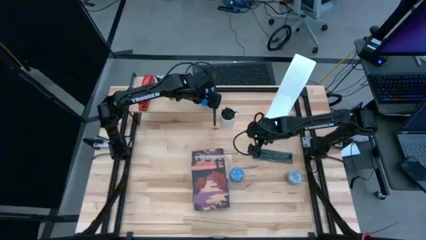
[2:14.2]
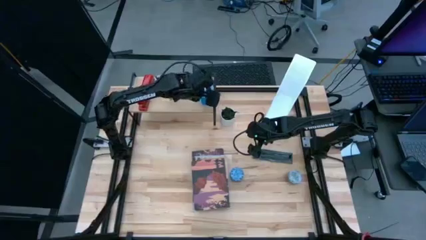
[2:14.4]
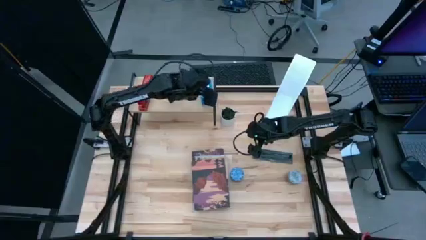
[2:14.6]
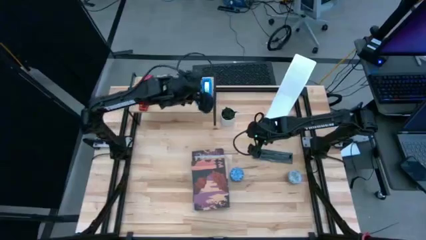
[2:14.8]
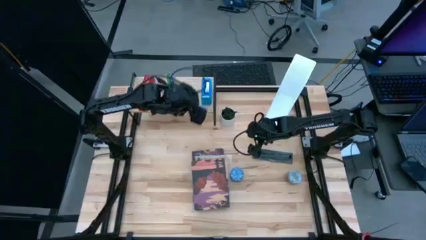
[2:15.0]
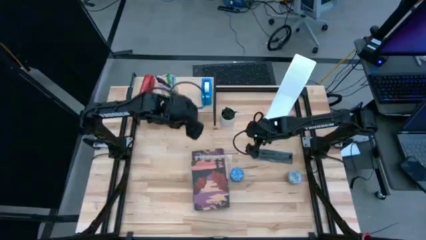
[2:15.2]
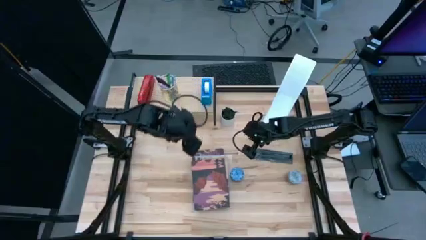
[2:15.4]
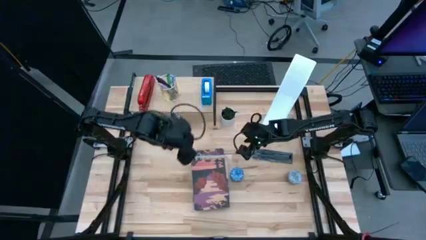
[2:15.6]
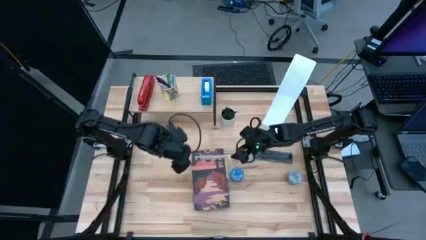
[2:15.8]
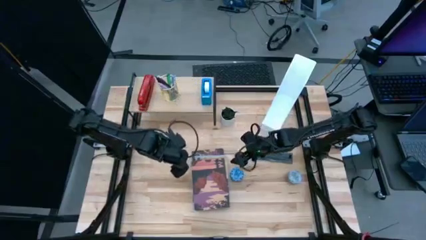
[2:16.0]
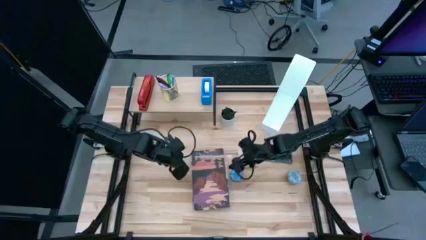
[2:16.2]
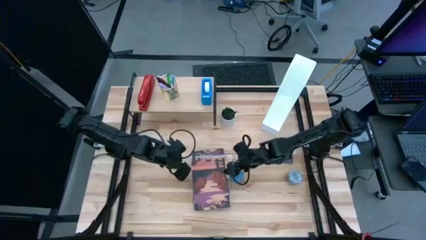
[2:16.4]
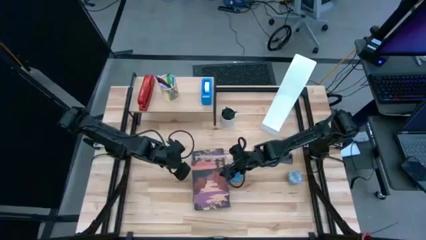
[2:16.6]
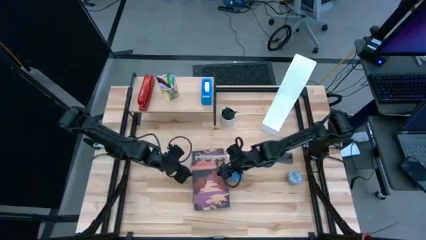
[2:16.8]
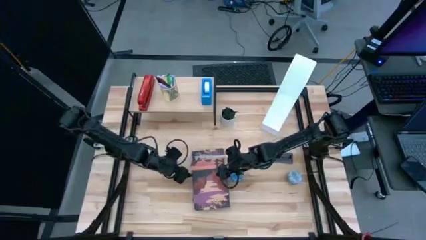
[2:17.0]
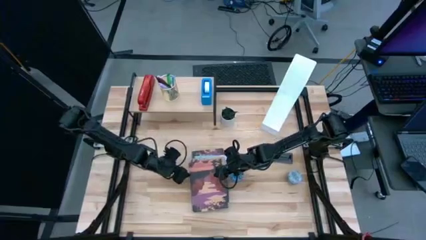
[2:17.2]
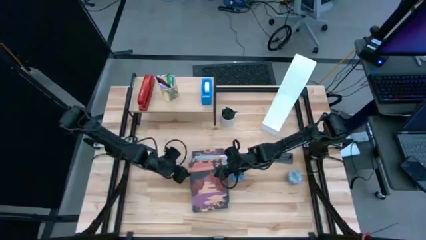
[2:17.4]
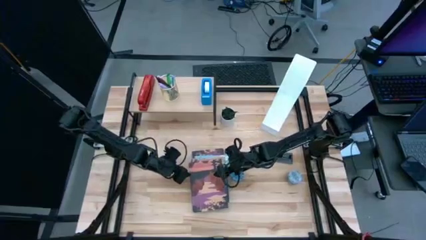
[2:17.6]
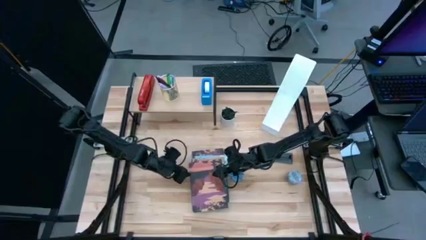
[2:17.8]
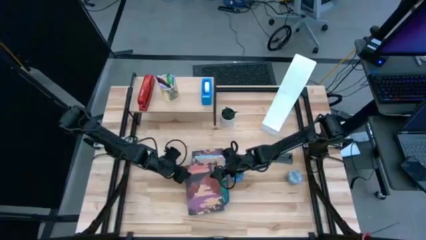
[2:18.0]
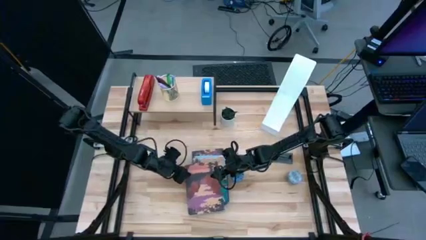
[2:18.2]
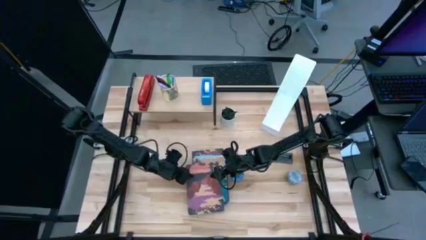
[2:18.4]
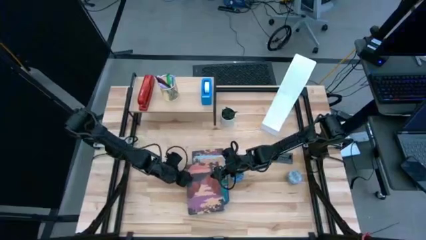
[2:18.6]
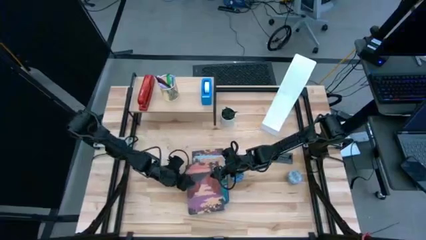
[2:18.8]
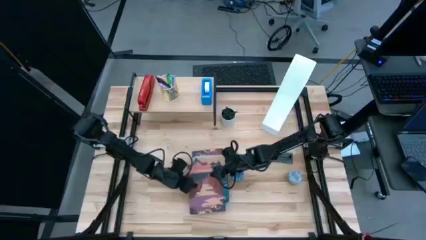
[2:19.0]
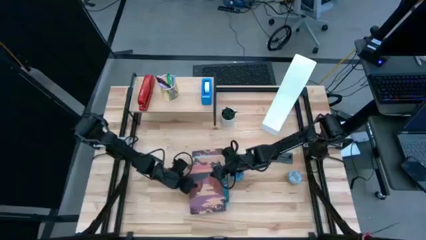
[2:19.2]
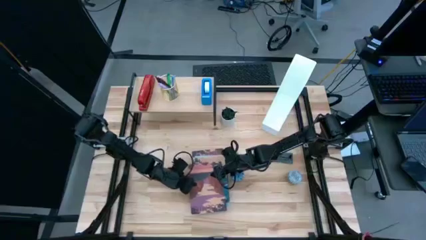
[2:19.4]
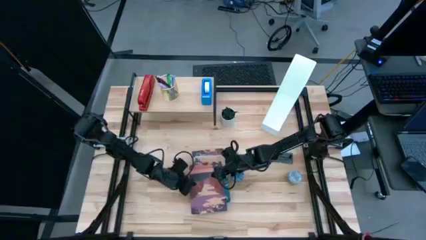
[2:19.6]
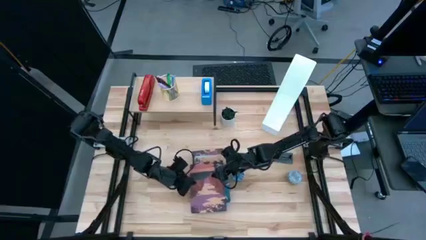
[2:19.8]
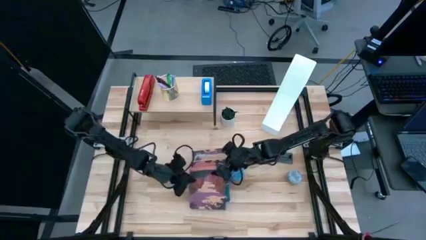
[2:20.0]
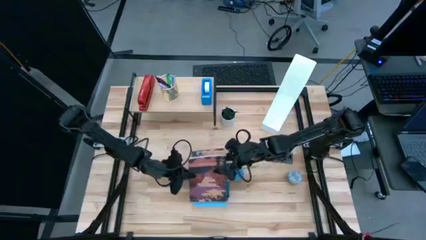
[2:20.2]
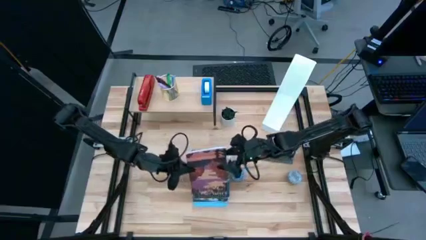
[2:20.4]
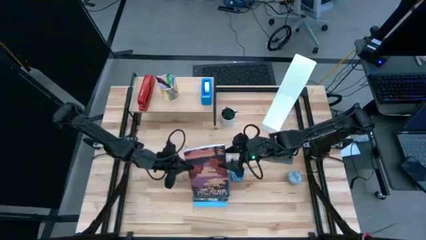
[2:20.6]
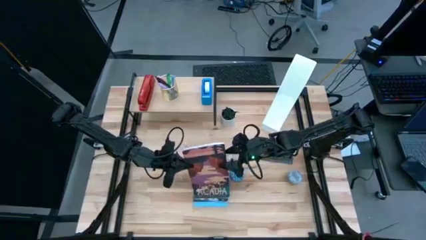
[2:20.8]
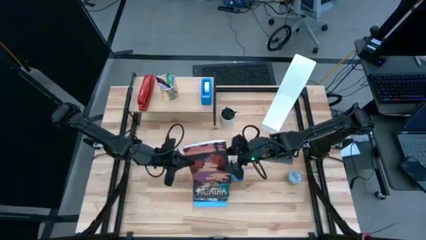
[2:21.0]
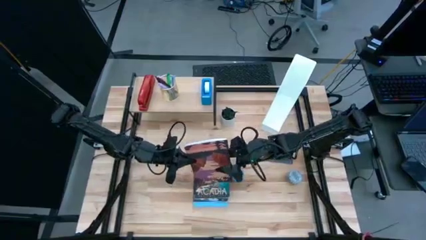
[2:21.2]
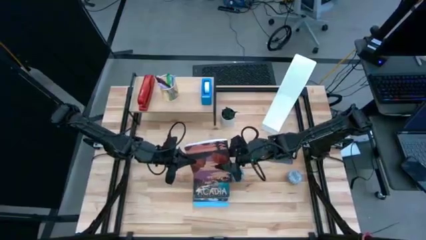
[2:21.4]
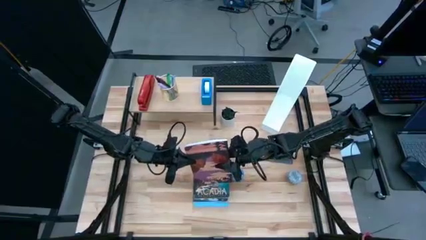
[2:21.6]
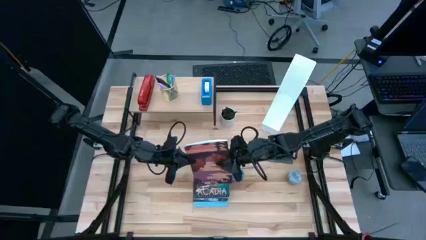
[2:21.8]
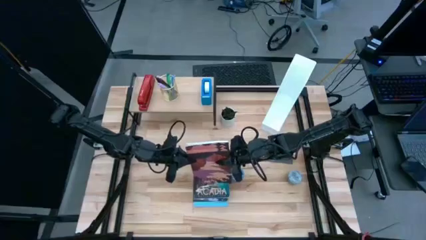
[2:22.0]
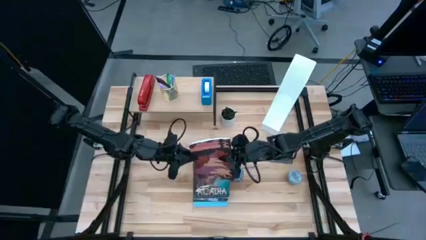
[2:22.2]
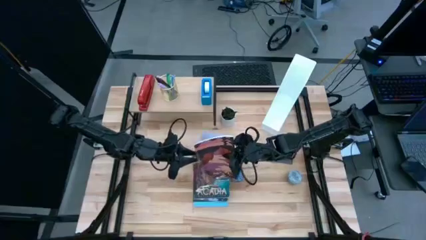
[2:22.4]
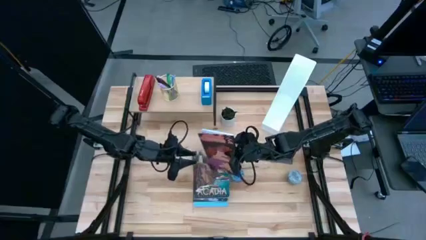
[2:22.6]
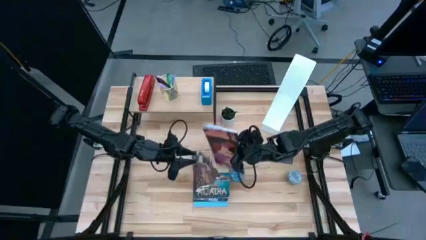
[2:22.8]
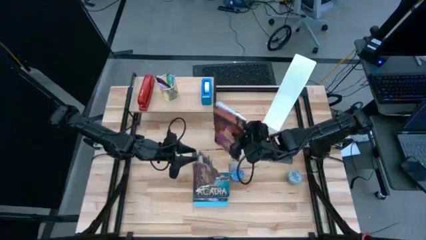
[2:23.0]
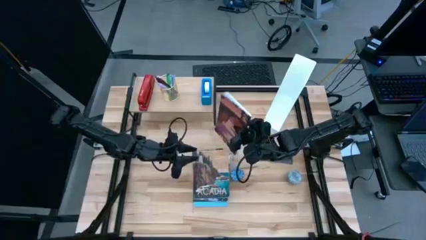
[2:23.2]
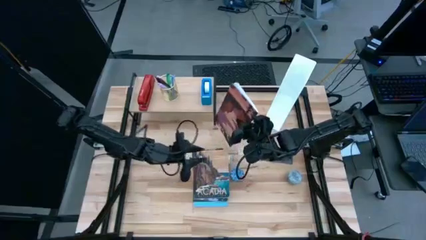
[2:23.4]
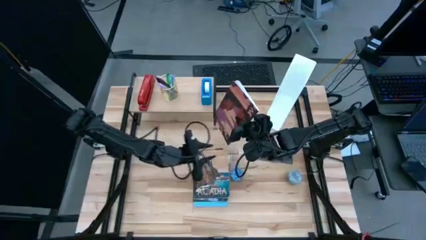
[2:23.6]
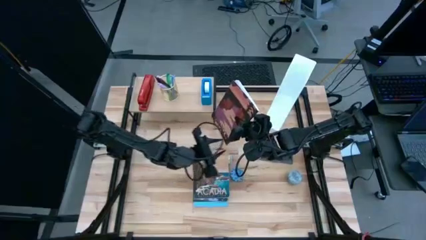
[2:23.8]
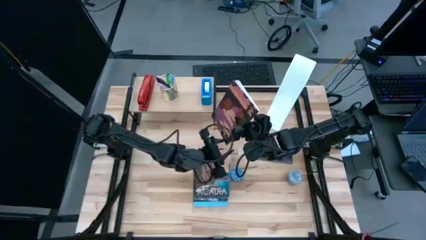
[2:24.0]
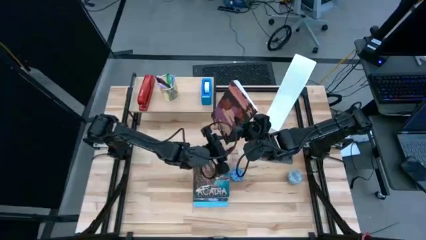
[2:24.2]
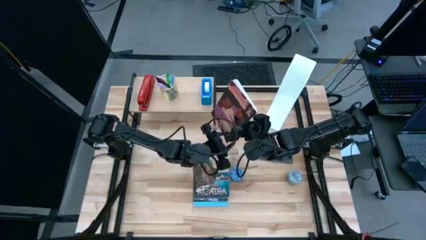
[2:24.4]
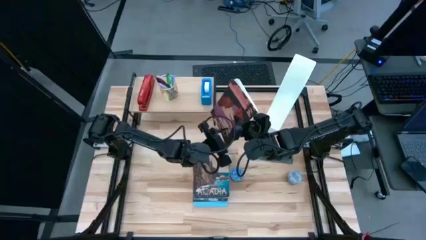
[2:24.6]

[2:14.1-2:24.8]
Task: Stock shelves
Put the purple/brown book into the white book shelf

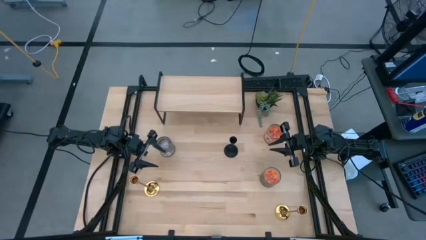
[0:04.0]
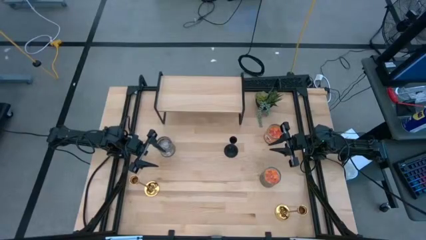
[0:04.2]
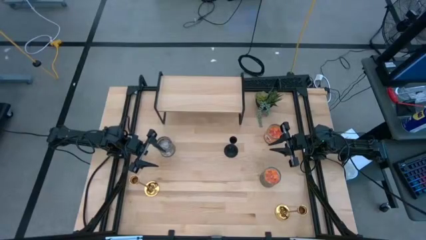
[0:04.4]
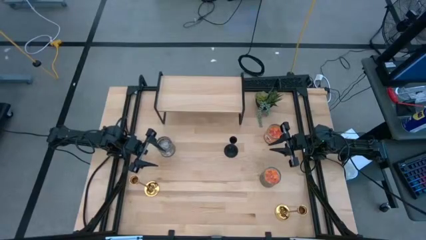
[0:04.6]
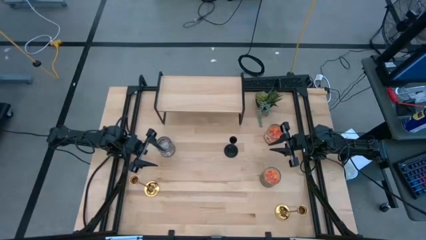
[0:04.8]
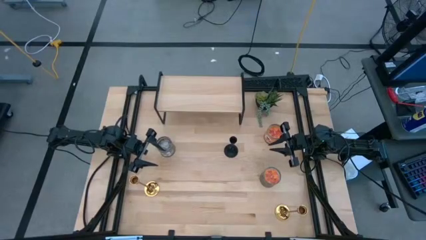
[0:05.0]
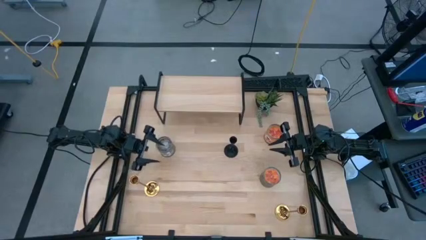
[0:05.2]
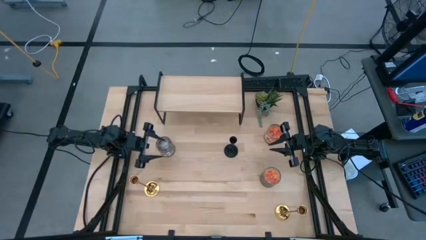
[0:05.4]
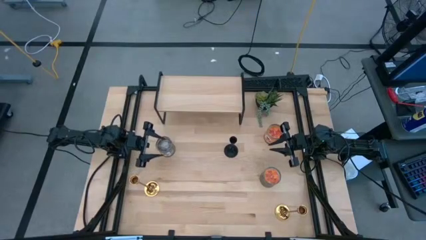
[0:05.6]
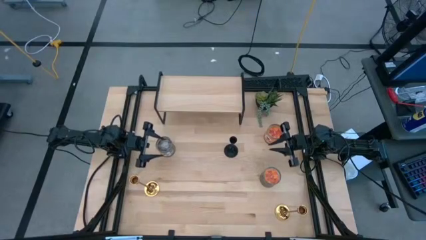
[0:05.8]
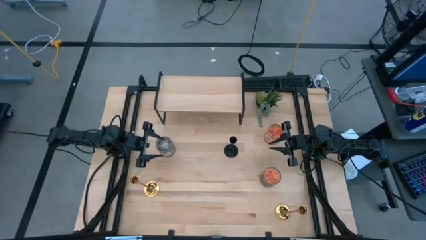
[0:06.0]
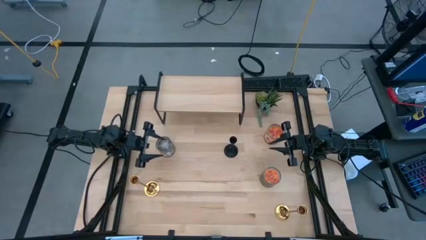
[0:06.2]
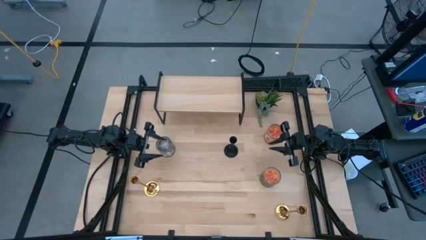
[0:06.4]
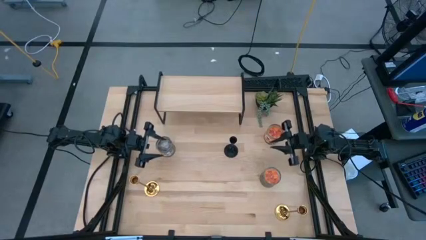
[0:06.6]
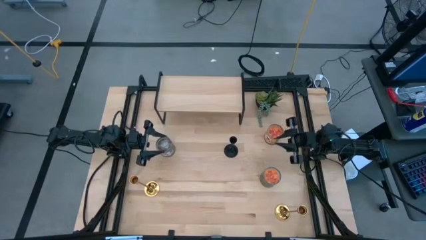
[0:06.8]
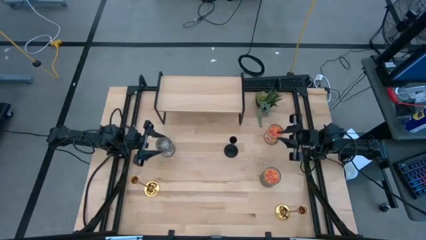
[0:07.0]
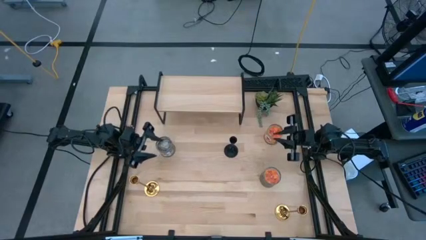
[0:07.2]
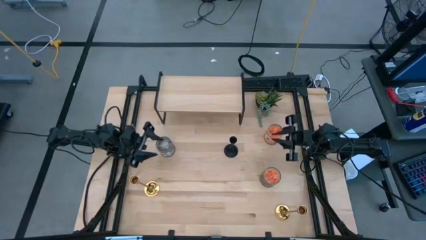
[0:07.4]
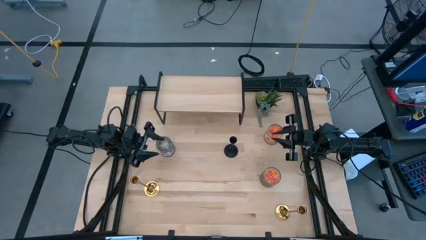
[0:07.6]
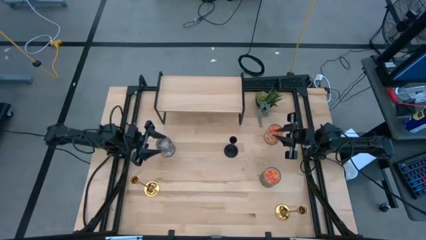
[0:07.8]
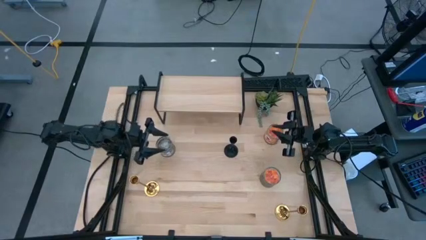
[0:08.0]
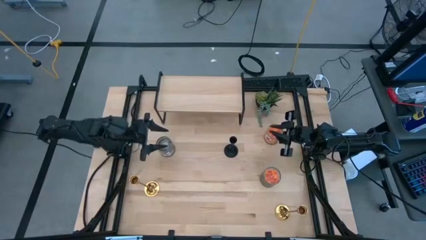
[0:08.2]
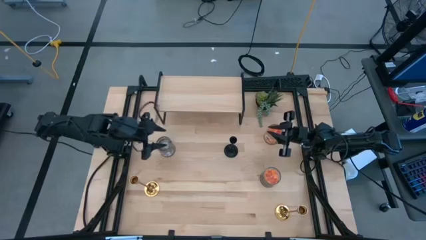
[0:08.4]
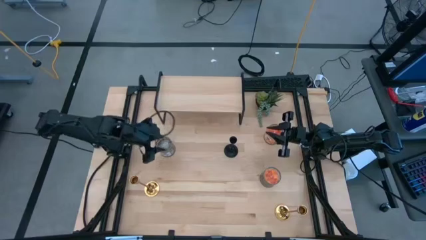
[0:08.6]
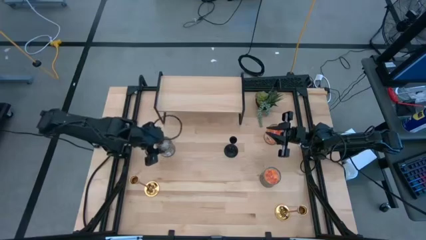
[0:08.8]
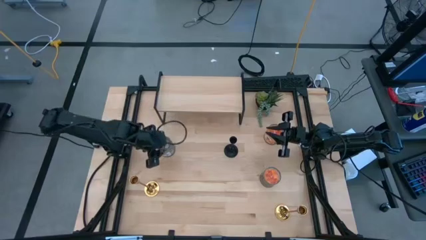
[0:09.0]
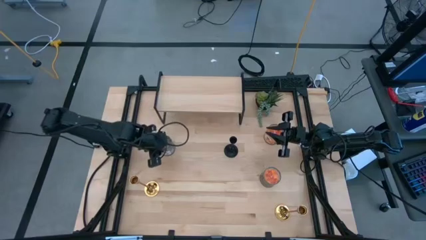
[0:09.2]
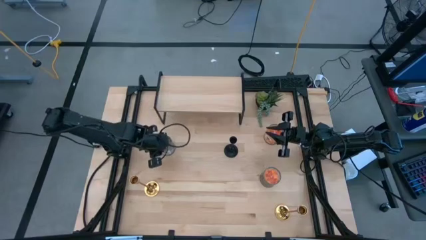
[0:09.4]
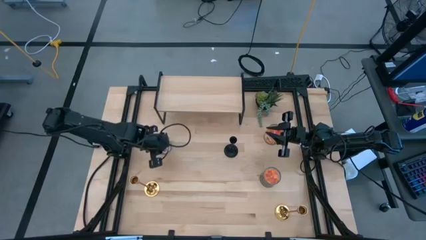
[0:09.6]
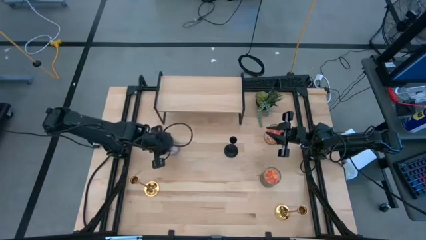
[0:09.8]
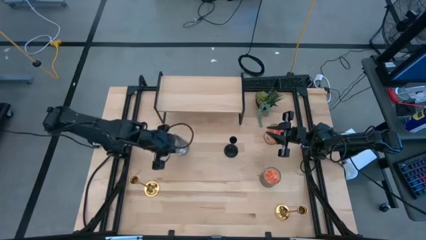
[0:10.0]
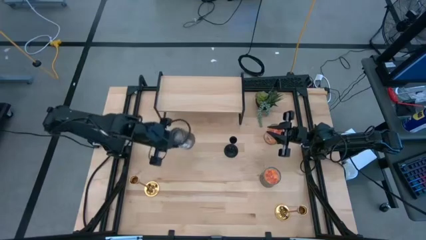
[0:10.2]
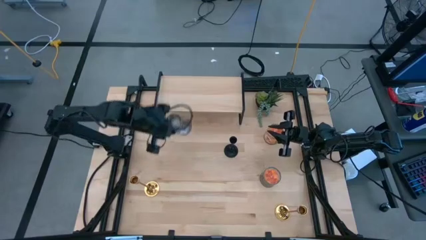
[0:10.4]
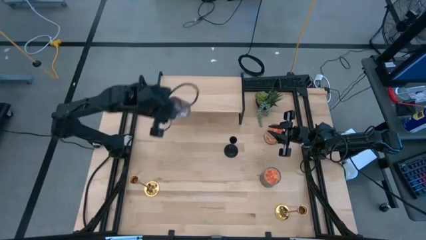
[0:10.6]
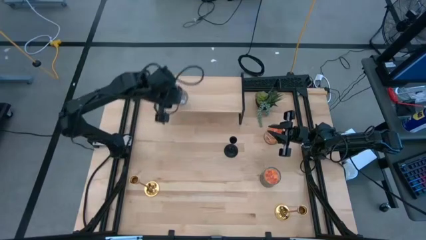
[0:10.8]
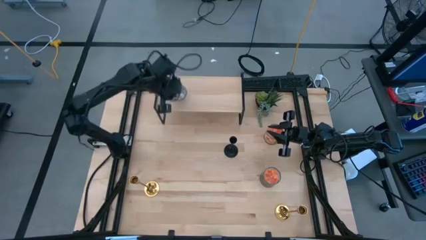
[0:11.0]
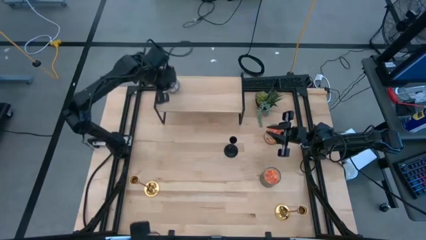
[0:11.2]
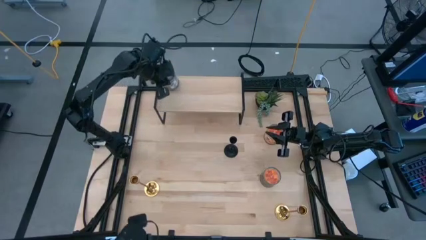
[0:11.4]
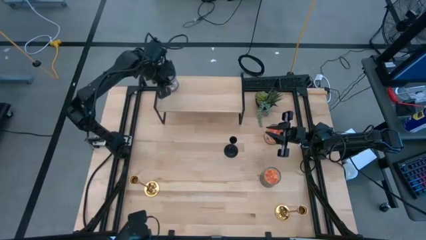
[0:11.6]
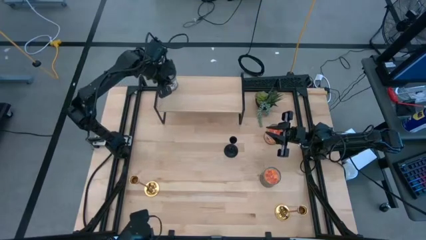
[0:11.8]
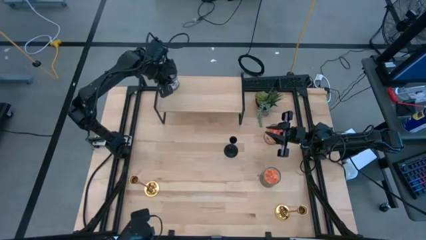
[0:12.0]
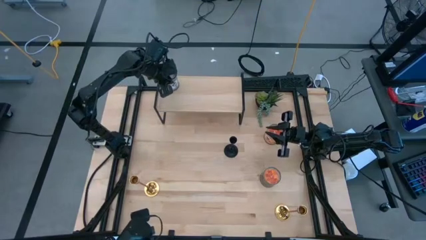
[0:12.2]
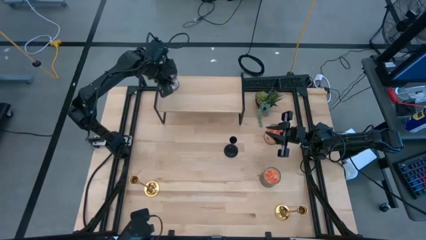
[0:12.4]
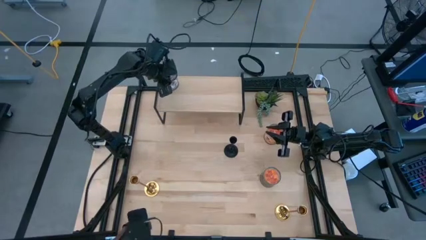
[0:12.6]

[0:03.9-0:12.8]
Task: Pick & Place candle stick holders
Put the left brown scented candle on the shelf
